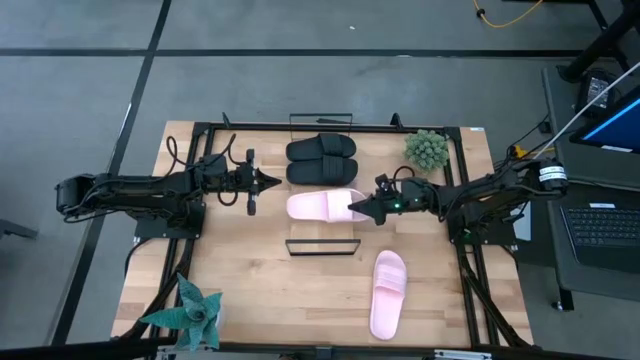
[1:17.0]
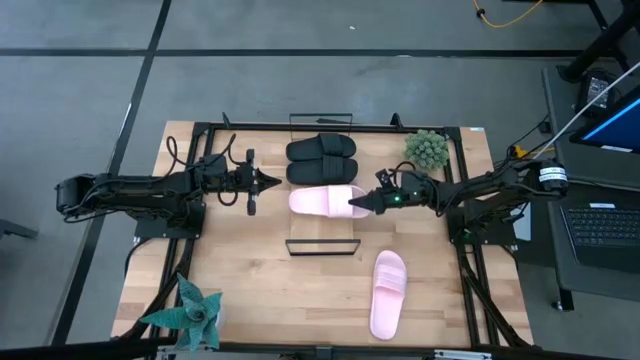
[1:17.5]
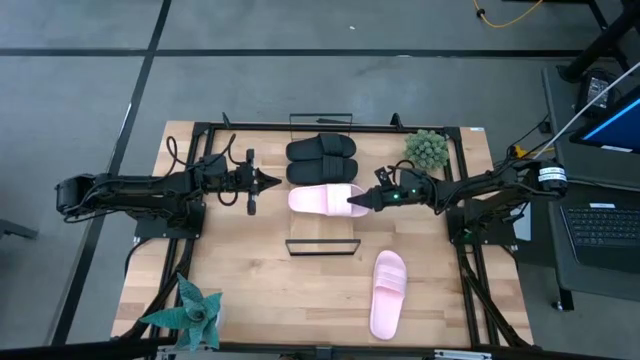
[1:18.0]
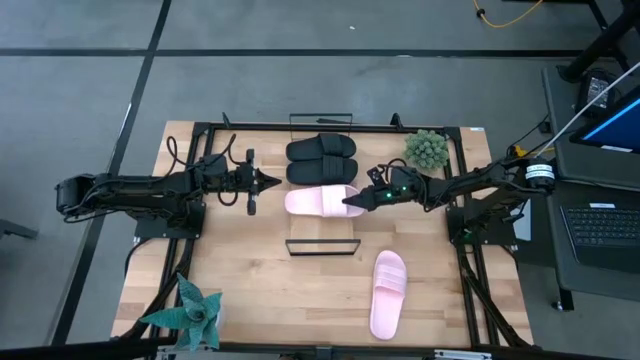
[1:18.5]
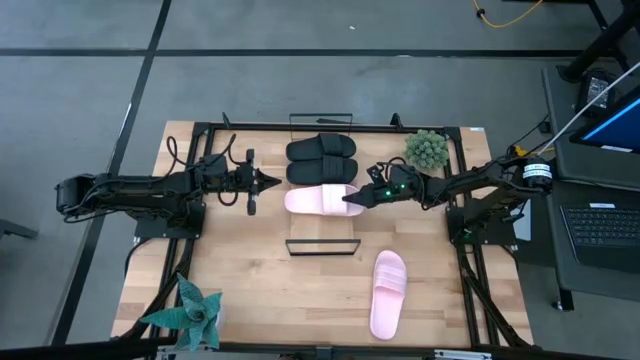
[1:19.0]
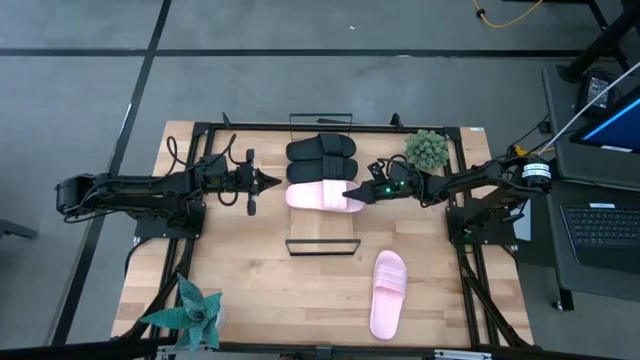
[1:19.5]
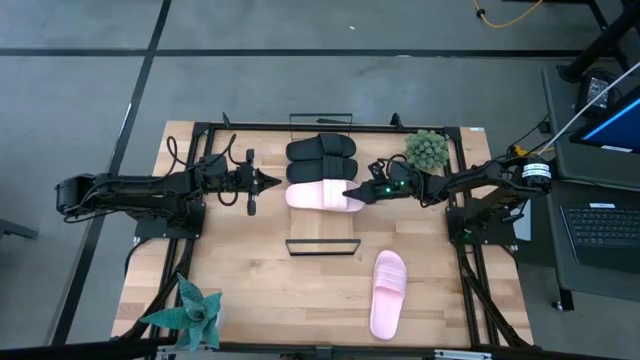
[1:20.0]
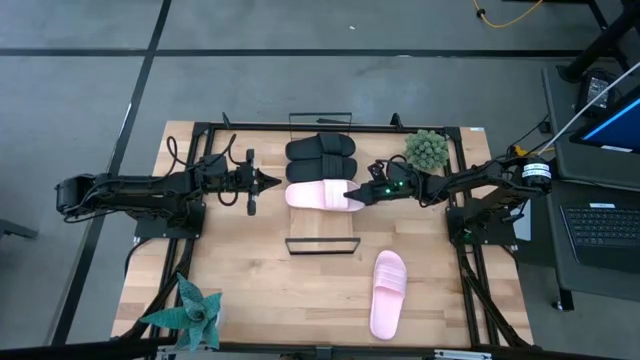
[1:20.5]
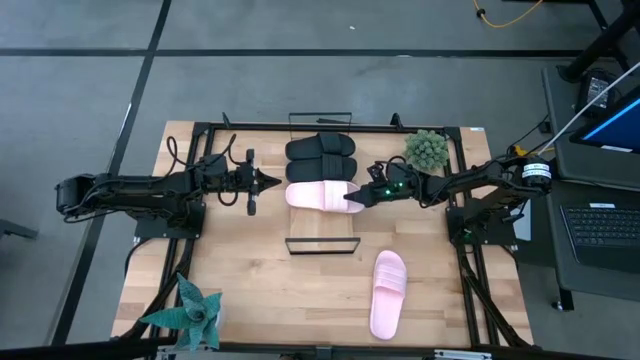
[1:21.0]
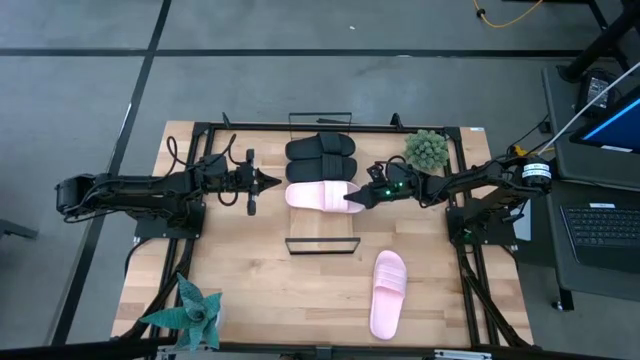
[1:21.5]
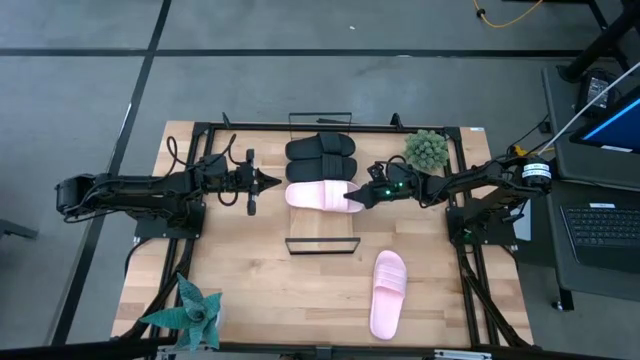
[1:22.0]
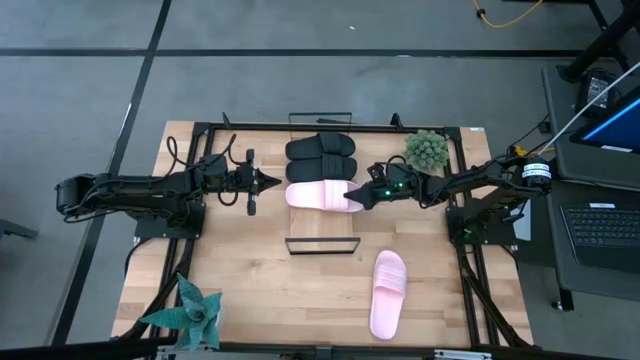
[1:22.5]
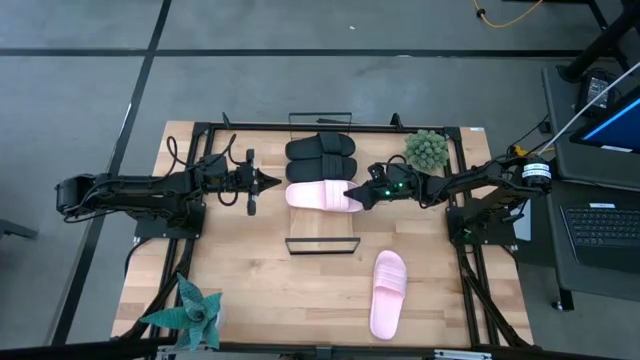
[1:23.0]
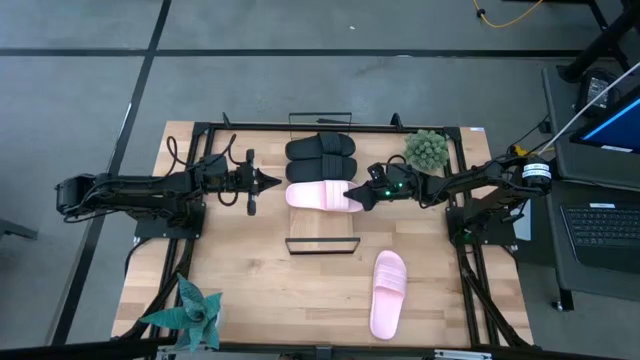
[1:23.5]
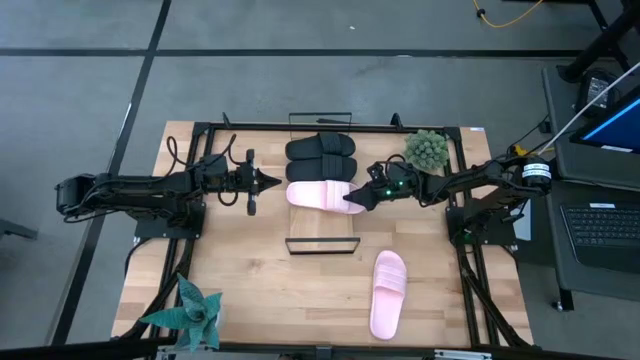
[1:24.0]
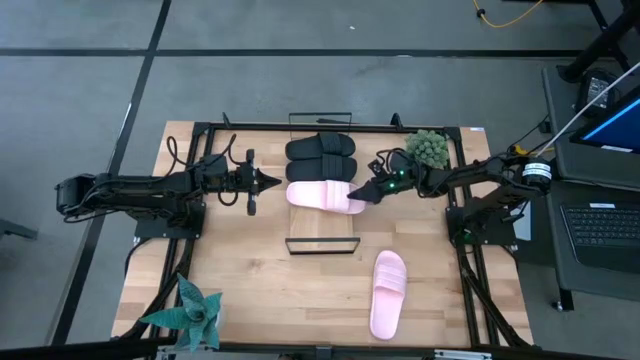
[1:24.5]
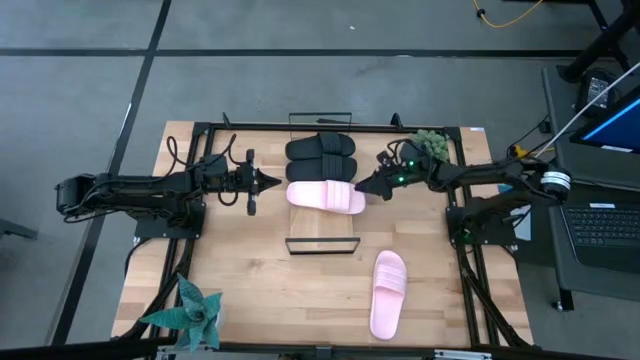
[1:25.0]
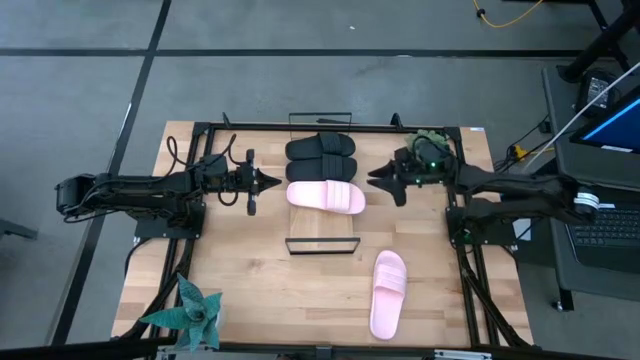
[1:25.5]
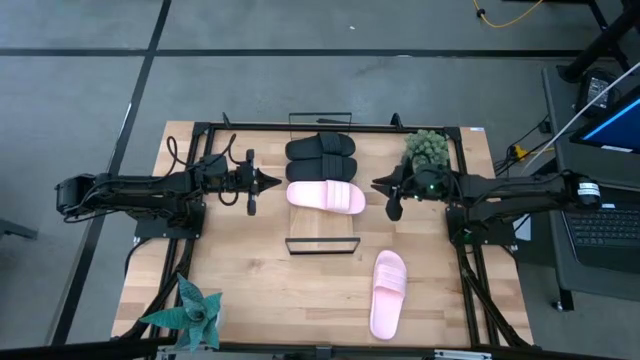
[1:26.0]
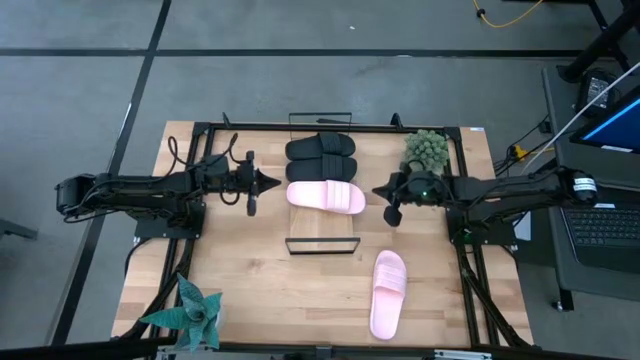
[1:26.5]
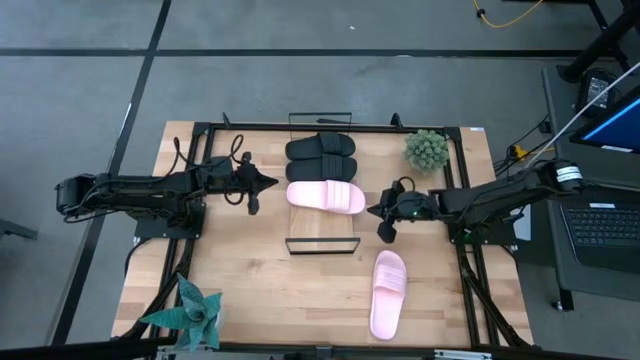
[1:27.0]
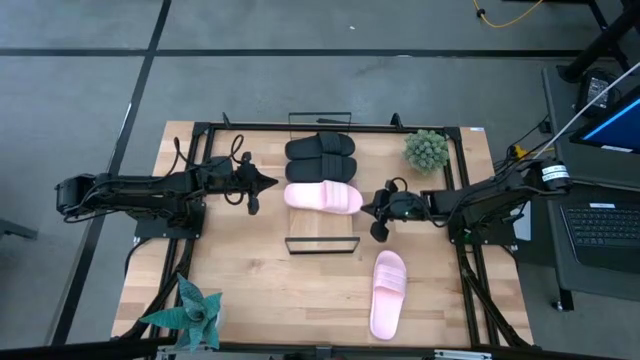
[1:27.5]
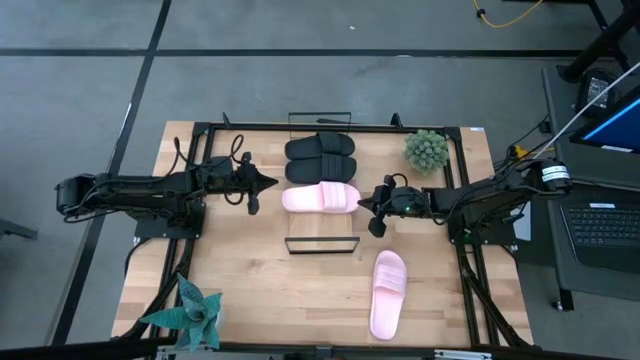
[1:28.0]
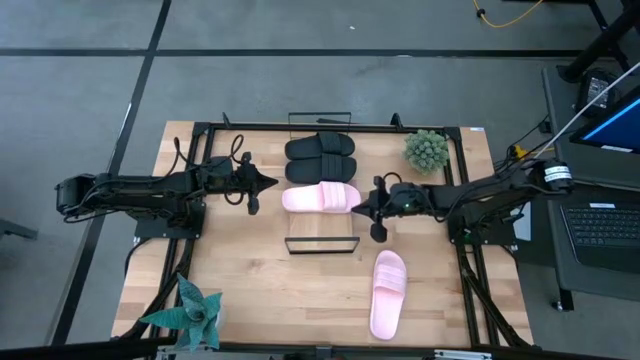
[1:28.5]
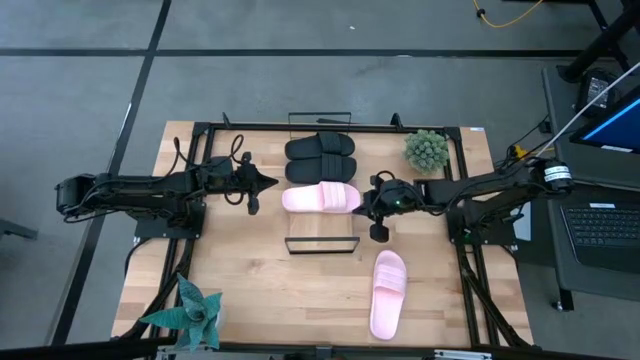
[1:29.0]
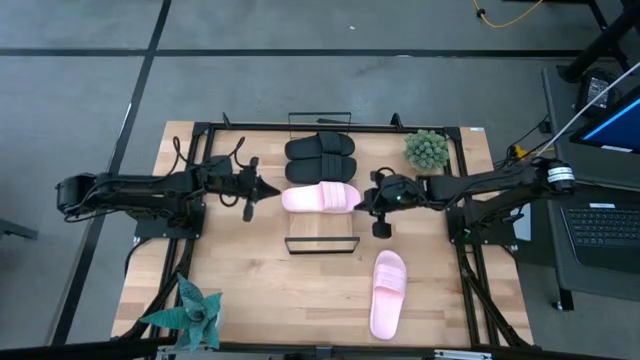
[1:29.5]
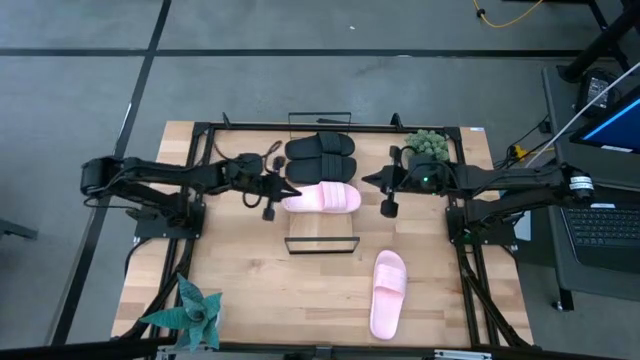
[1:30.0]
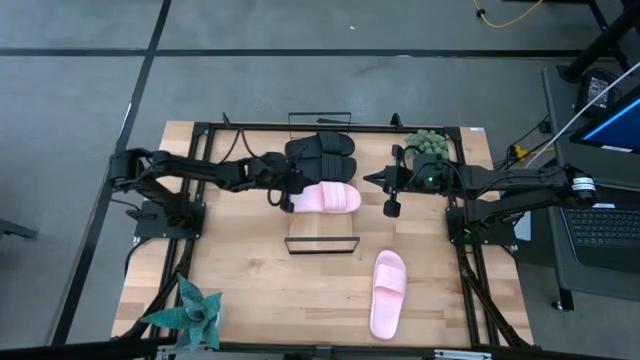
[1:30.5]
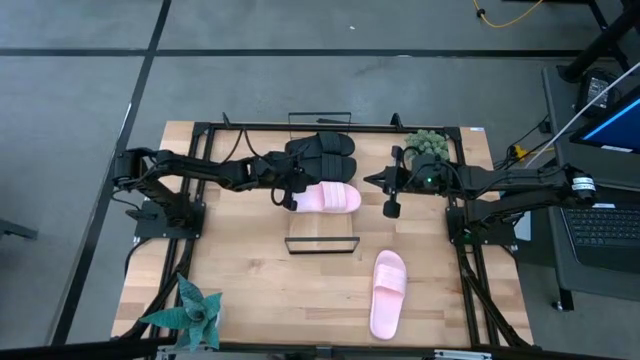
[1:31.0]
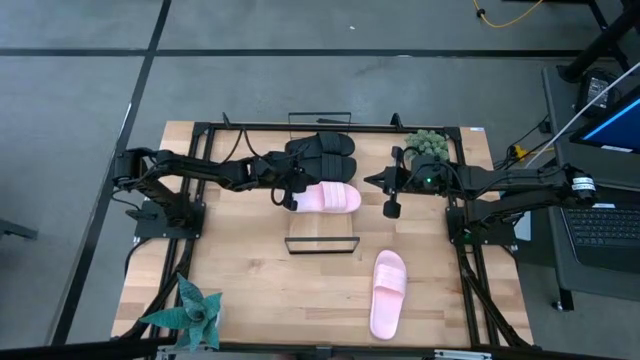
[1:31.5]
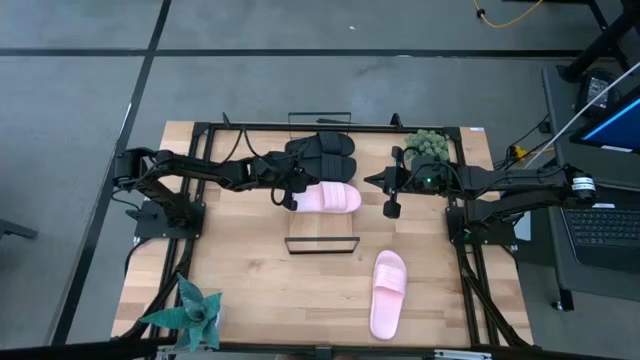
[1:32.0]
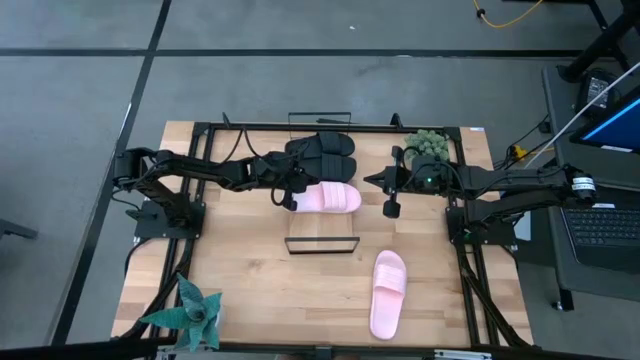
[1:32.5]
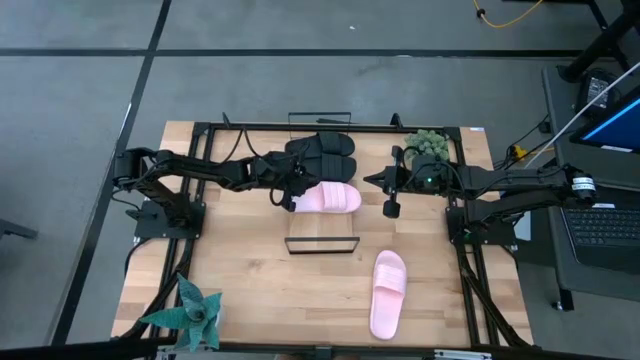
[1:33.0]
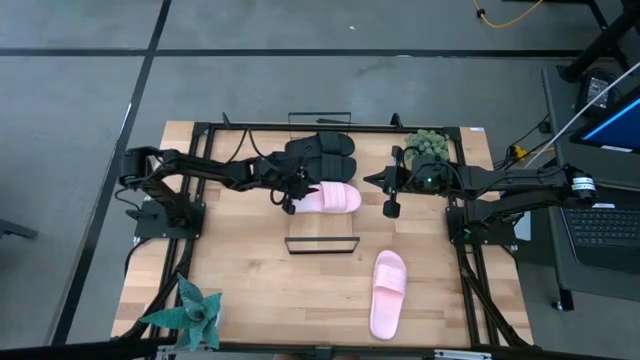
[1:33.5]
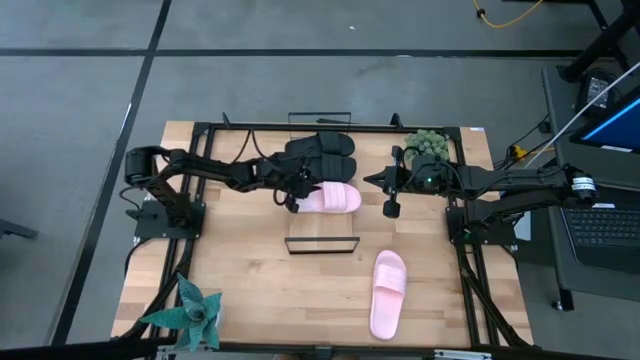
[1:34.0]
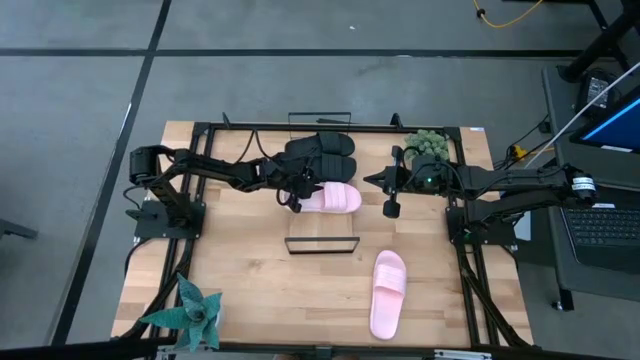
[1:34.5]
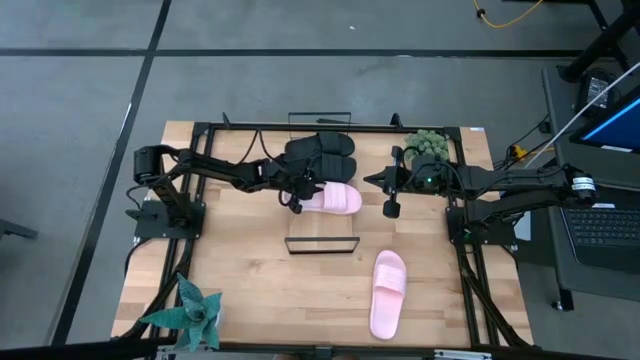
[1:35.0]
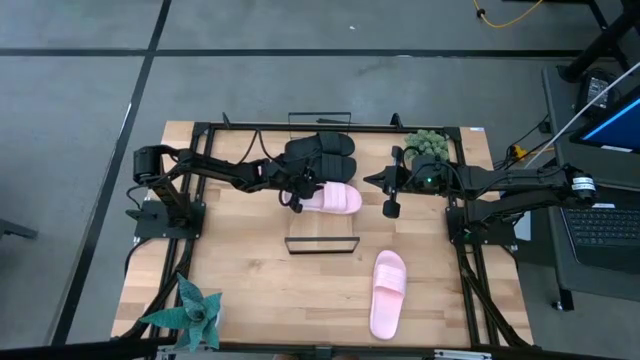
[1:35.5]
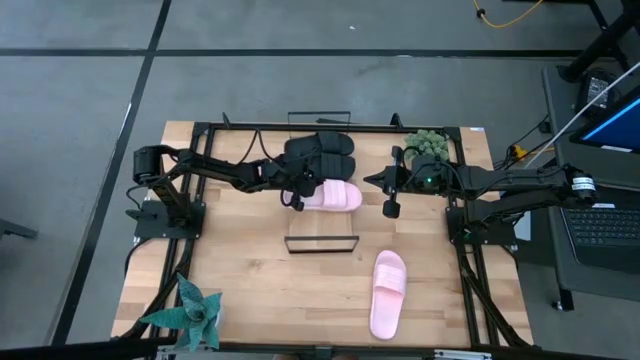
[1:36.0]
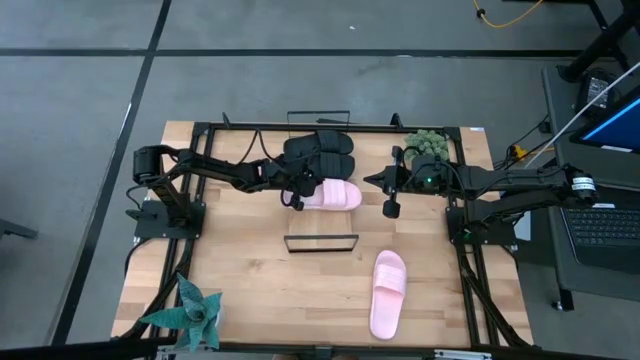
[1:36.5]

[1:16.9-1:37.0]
Task: Pick and place slides into the shelf
Put the top pink slide on the shelf

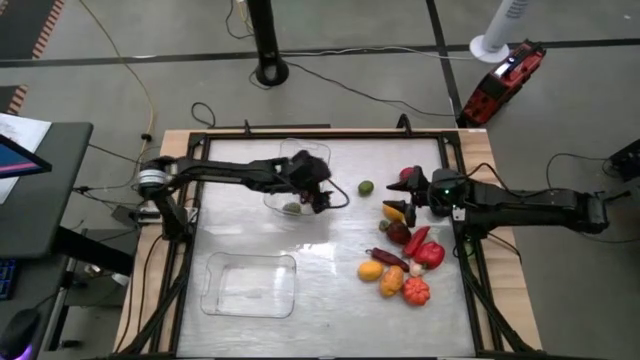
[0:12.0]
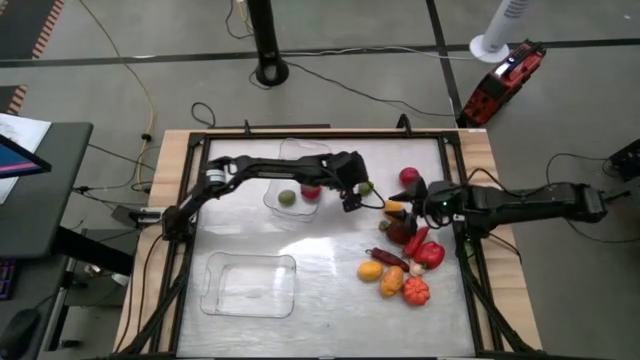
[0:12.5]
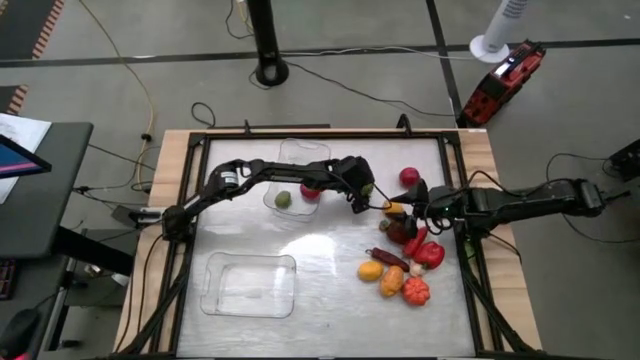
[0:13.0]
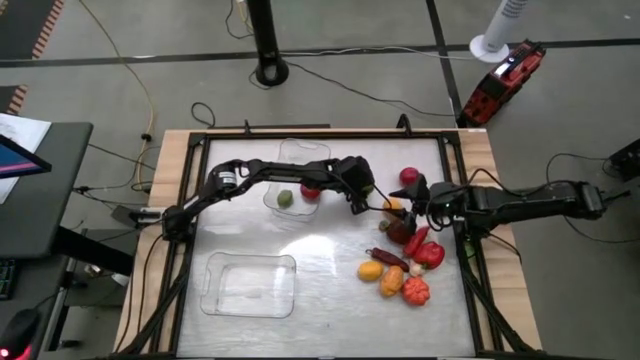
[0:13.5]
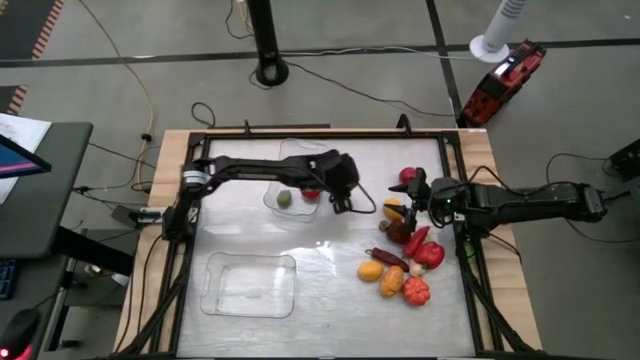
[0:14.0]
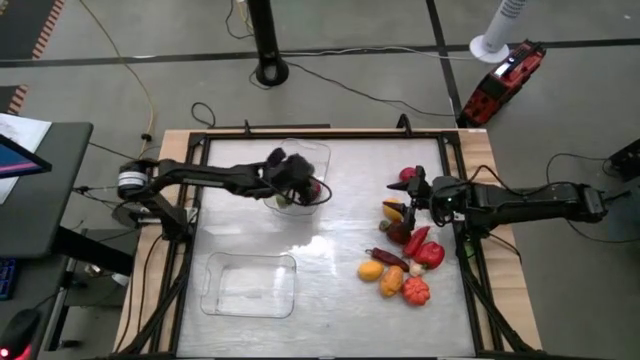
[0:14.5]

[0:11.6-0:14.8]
Task: Sort produce into baskets
Put the lime into the top transparent bin
